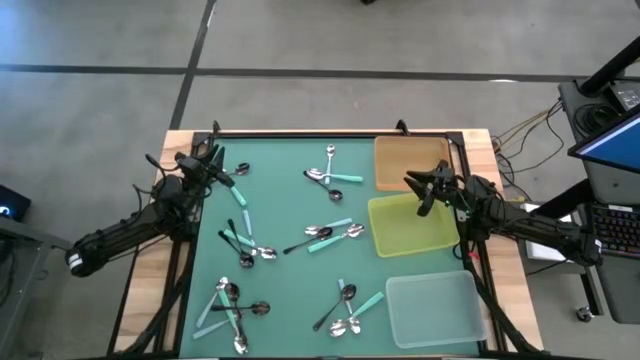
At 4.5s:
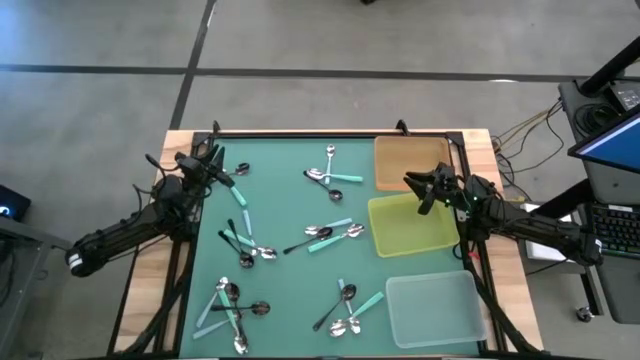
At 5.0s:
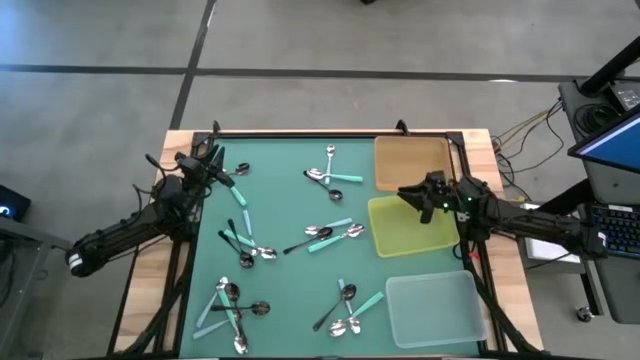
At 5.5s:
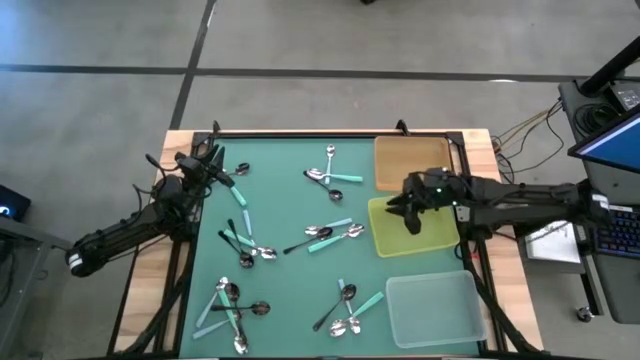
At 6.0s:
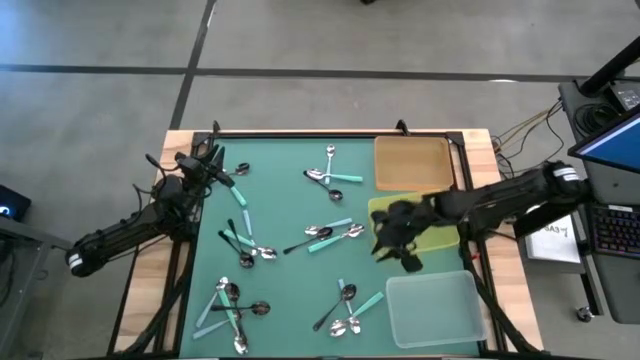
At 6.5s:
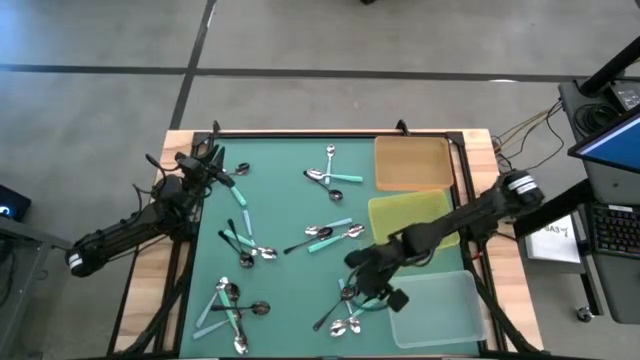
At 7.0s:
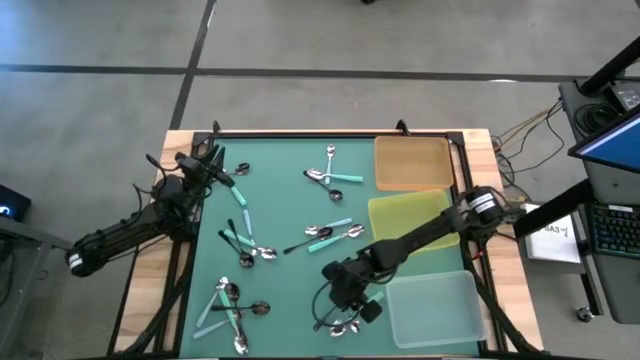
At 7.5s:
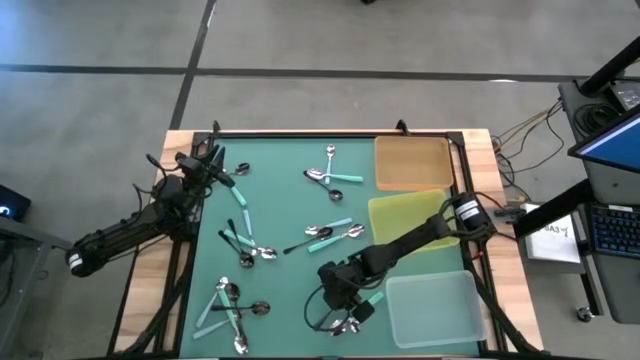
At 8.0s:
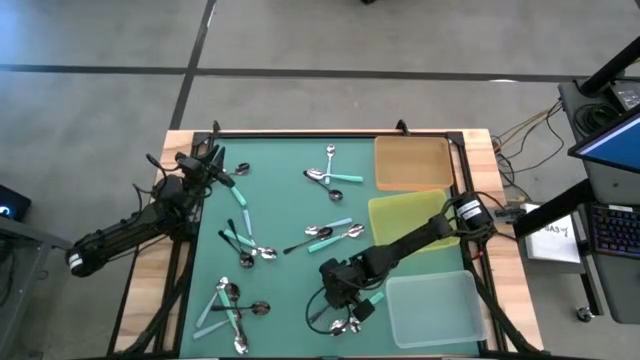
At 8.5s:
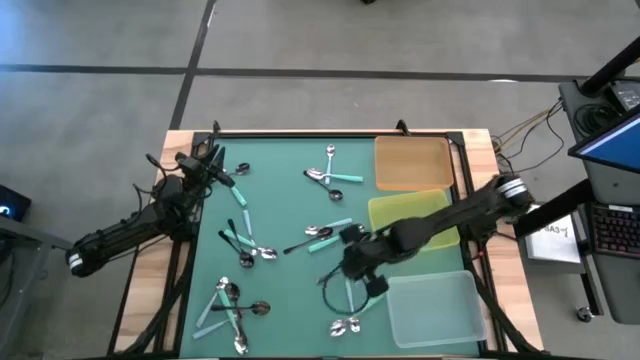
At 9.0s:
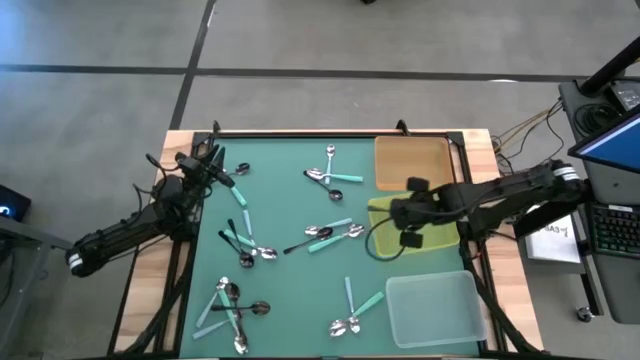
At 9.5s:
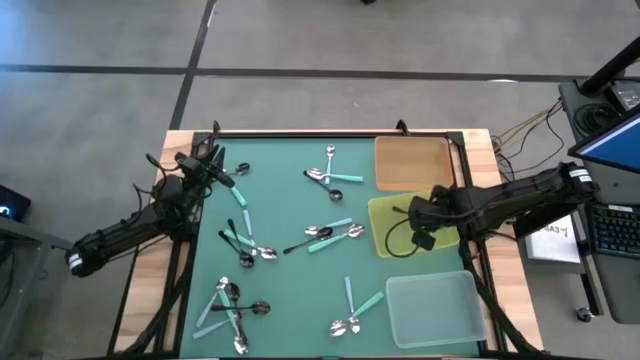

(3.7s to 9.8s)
Task: Sort silverware by color (type)
Put the black spoon into the yellow bin

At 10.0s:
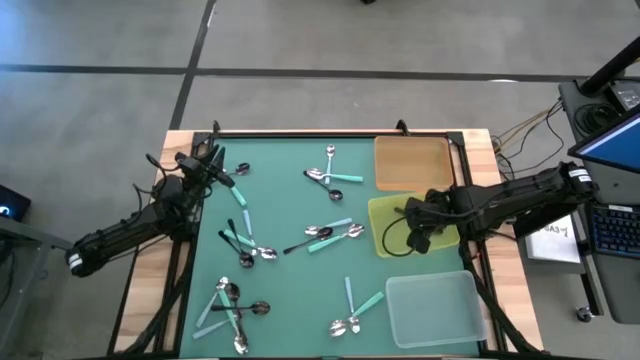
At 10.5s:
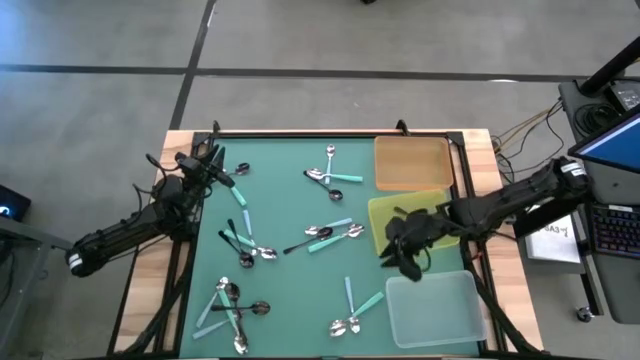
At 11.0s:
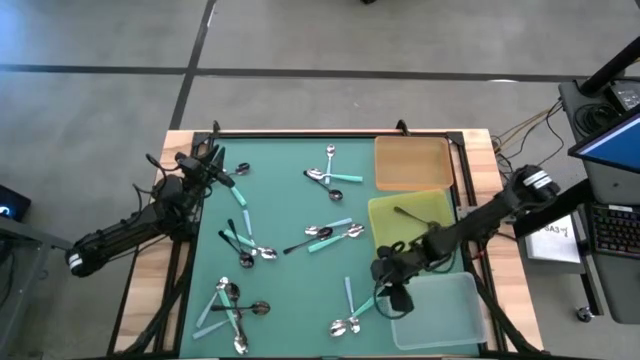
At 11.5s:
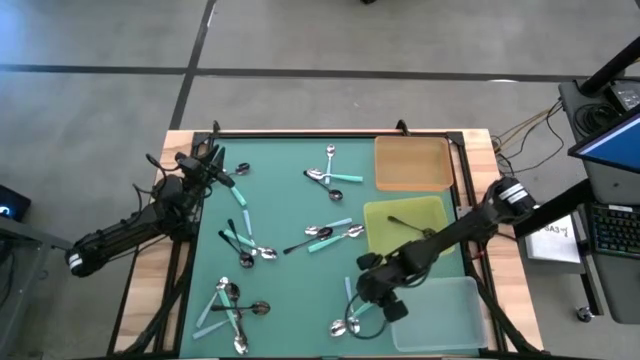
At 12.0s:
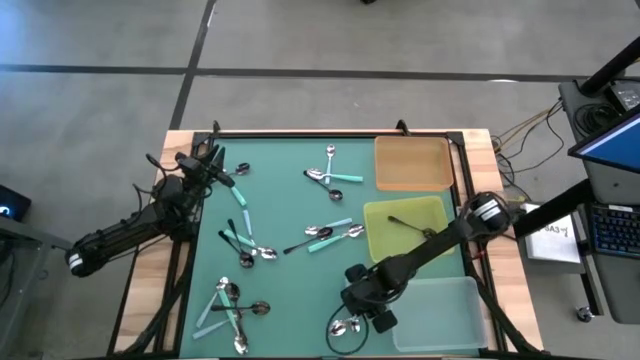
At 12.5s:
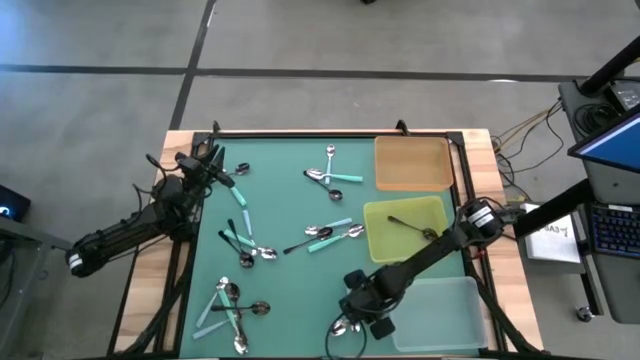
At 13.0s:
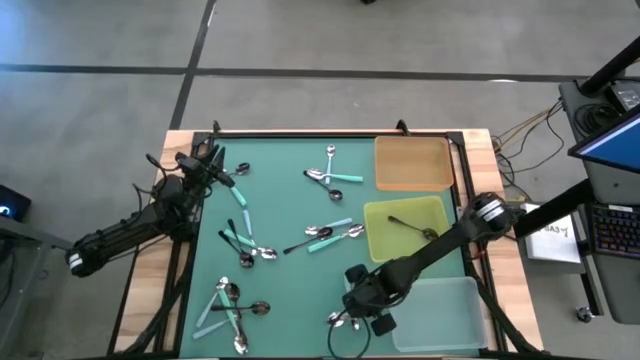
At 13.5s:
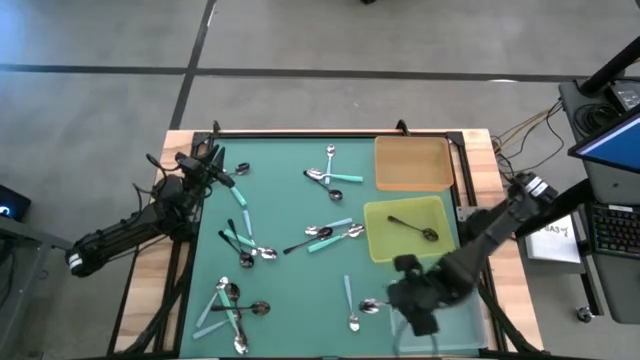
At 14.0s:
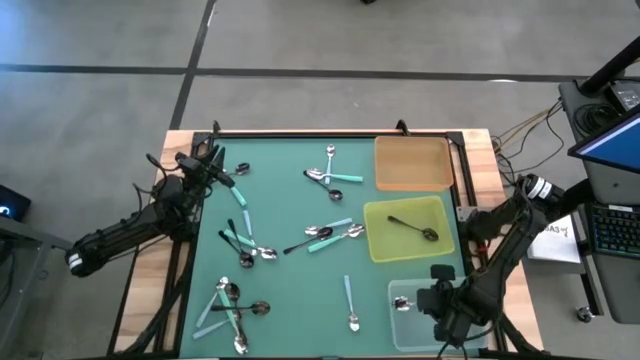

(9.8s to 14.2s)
Put the green spoon into the transparent bin

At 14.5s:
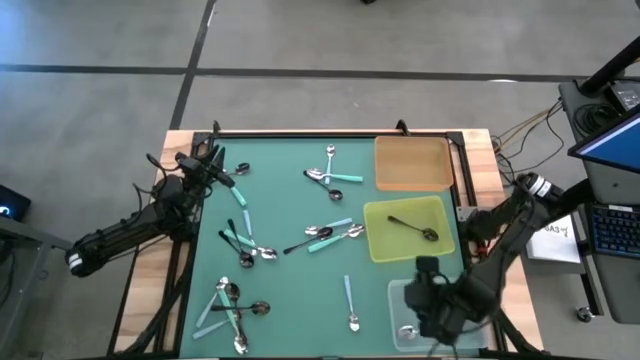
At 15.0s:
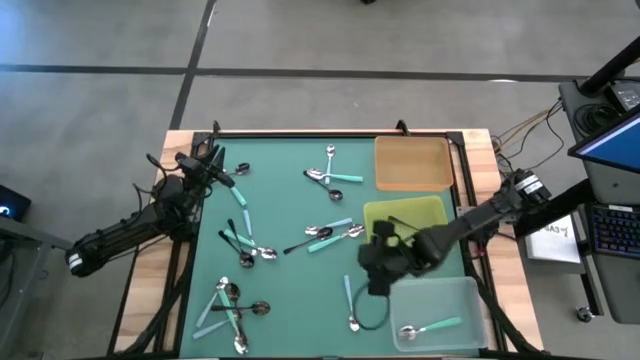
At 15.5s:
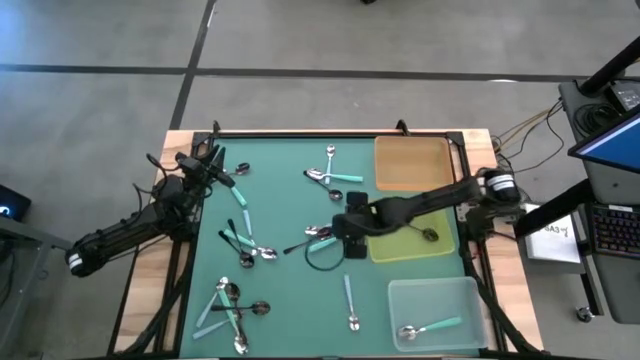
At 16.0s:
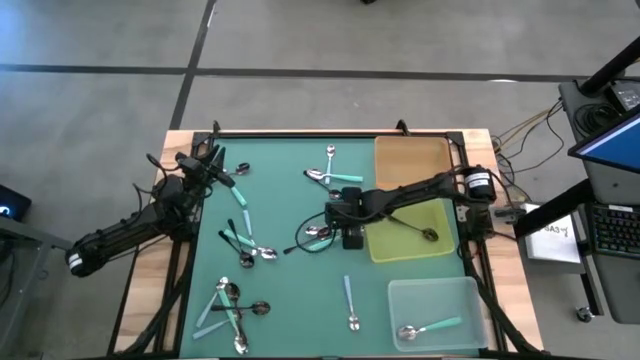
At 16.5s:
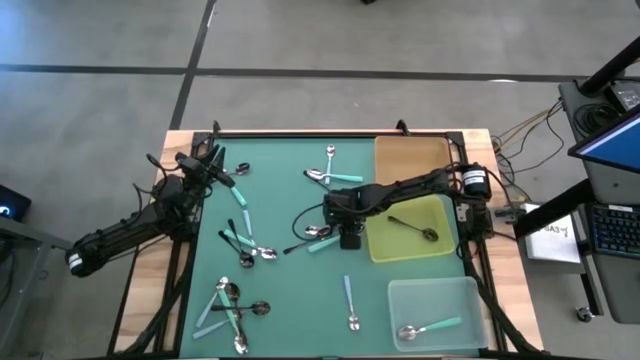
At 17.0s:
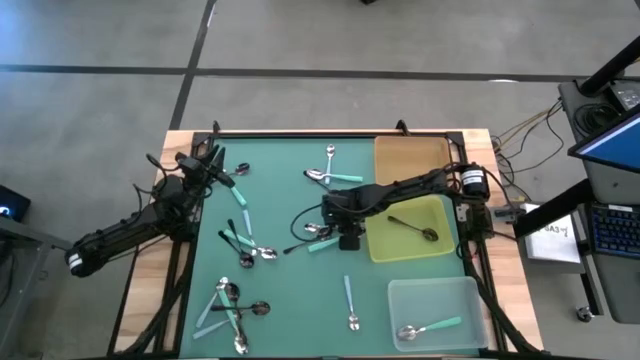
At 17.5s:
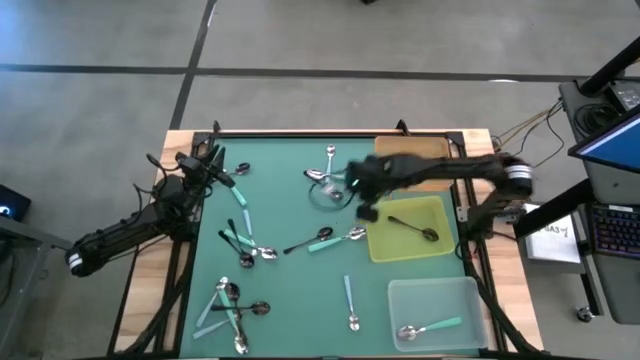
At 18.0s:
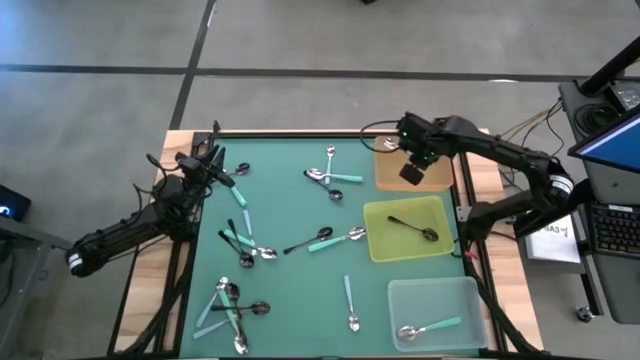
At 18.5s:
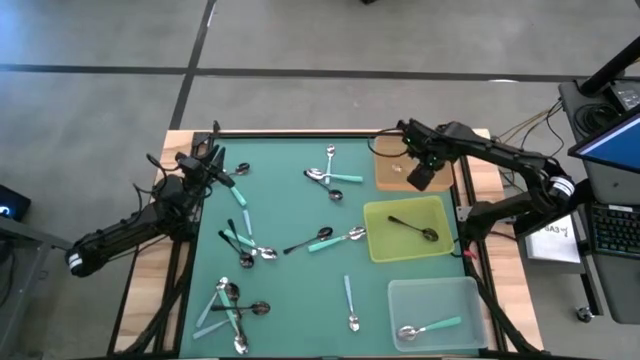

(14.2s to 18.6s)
Put the blue spoon into the orange bin

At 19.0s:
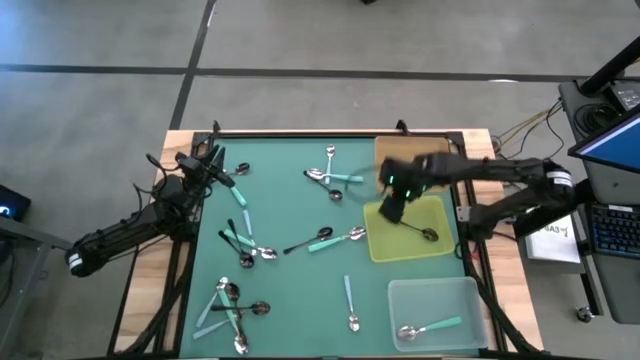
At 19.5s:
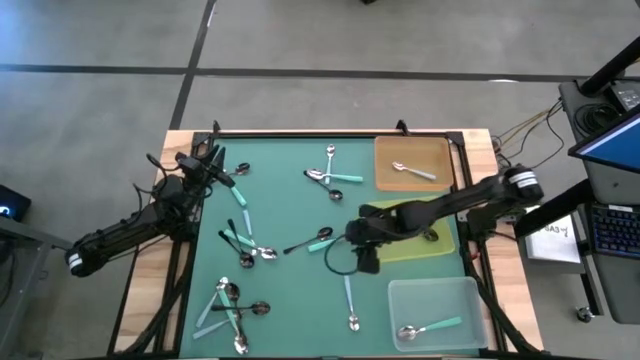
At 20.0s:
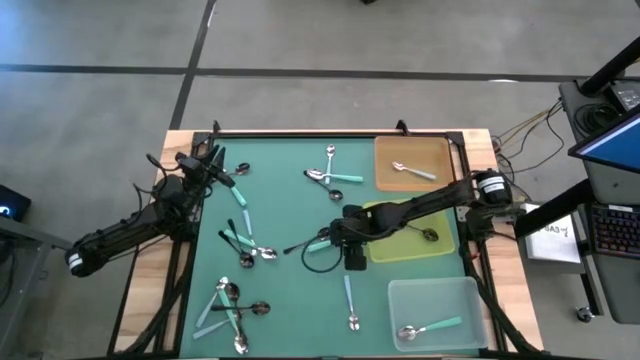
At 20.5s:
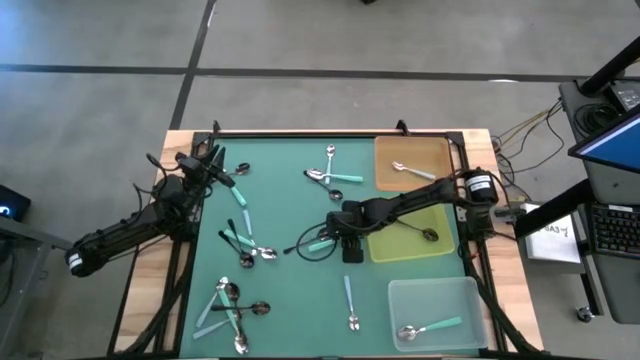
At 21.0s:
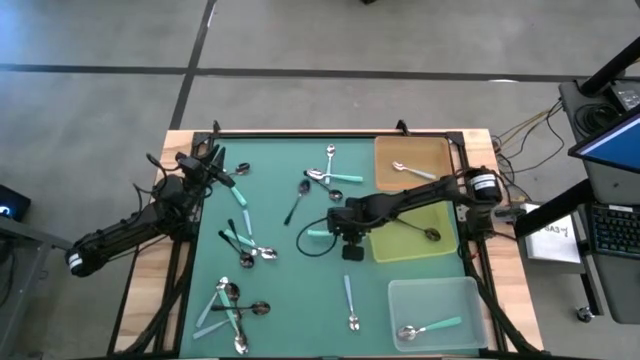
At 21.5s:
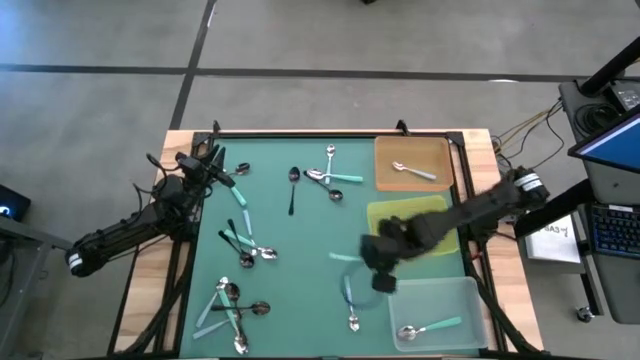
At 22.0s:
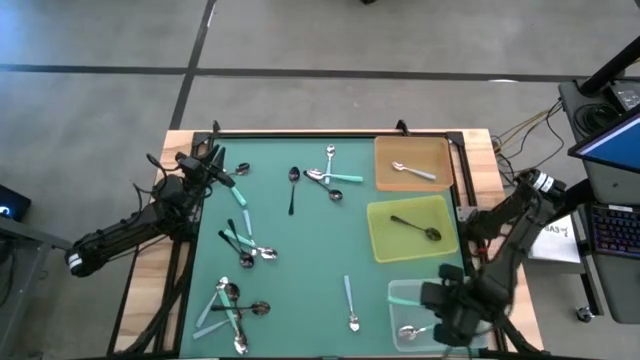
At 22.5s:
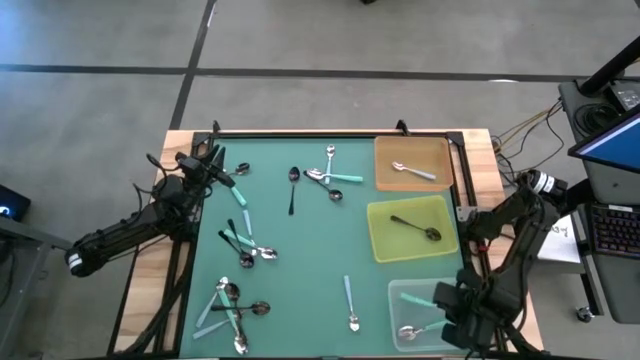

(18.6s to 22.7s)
Put the green spoon into the transparent bin

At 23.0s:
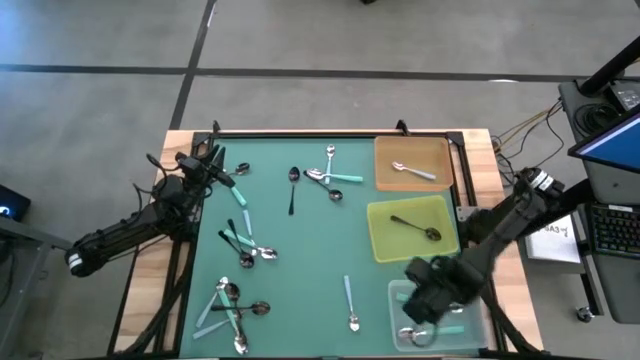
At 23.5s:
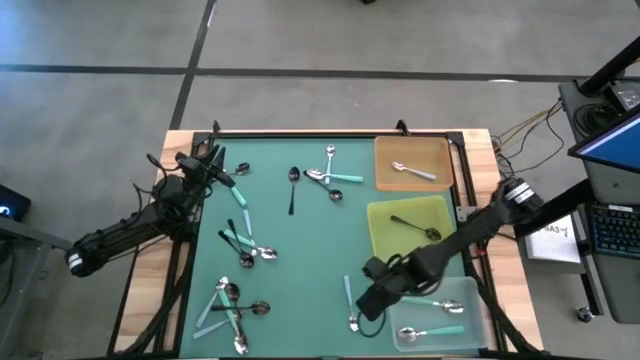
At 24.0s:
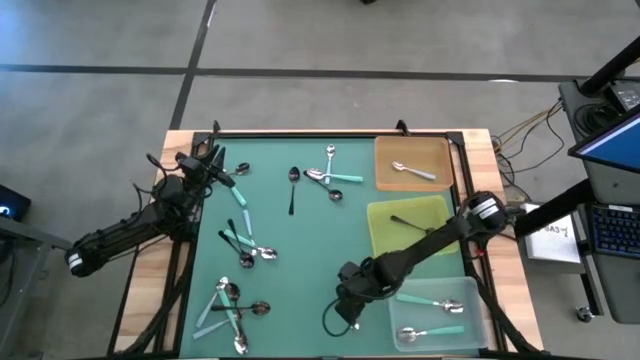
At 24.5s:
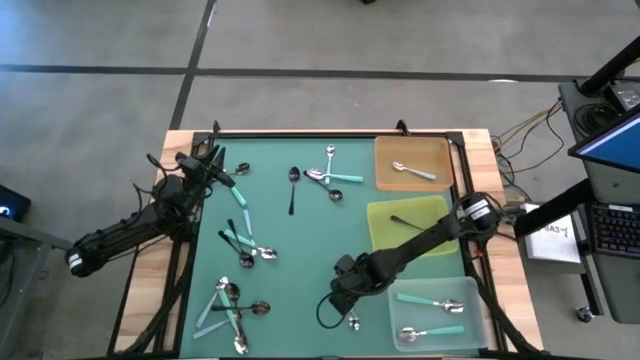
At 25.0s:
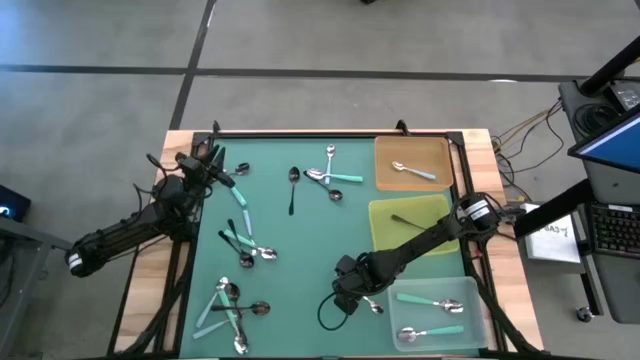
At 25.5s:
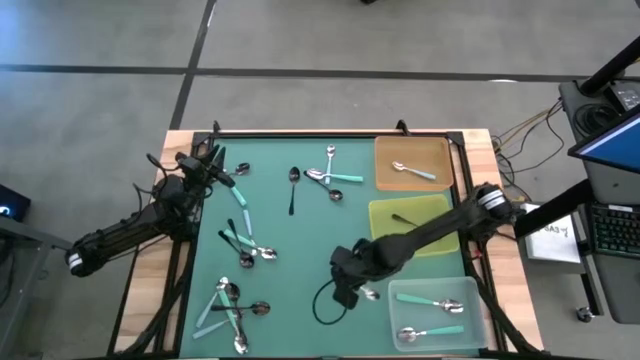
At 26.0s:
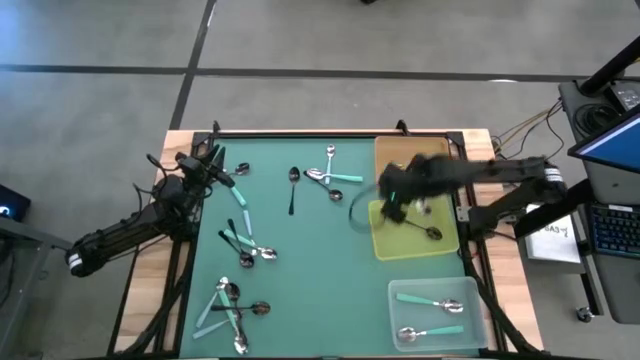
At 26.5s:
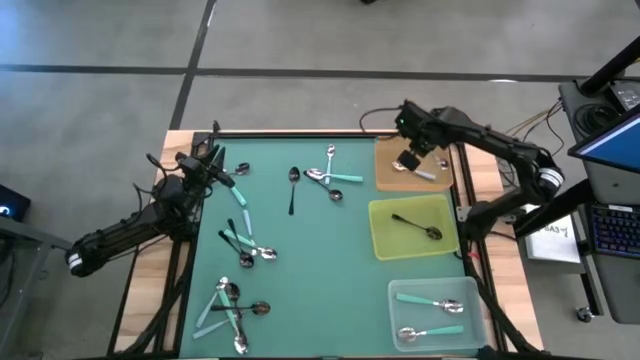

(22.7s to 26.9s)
Put the blue spoon into the orange bin
